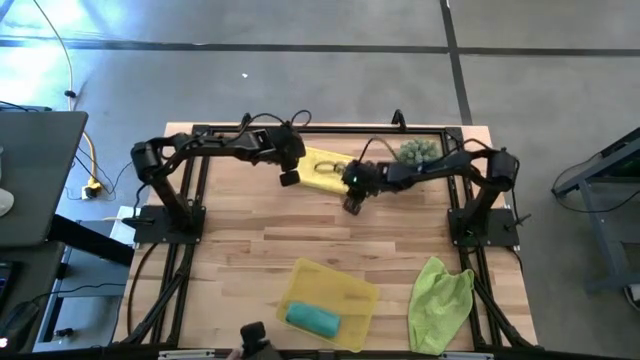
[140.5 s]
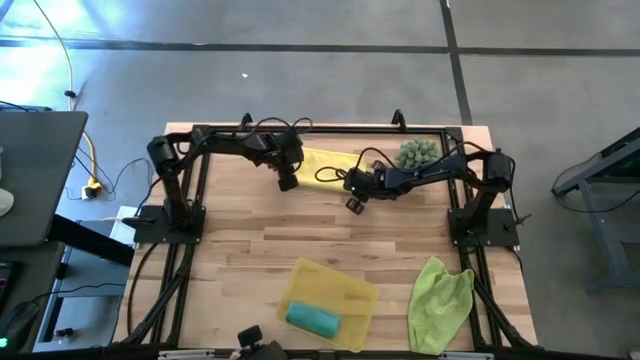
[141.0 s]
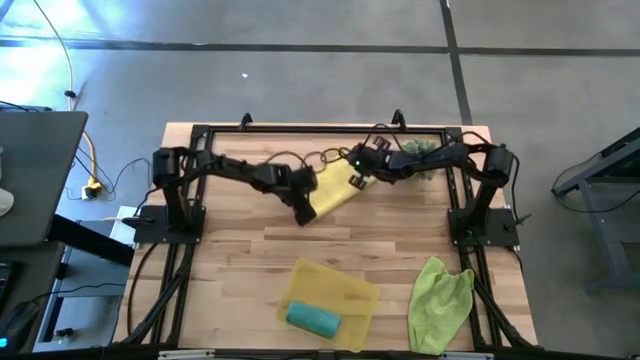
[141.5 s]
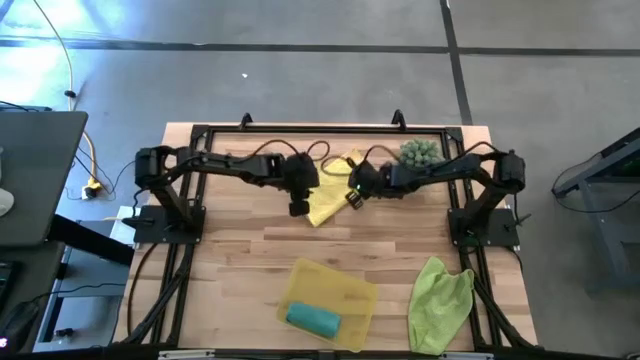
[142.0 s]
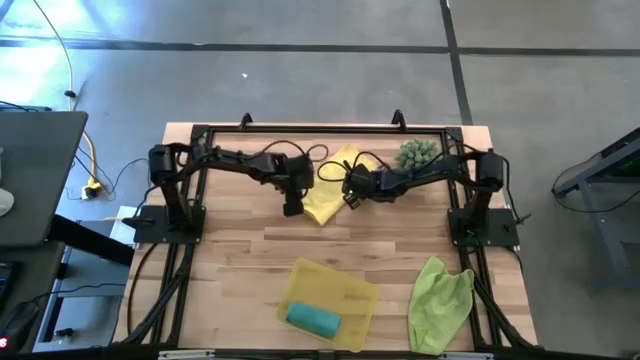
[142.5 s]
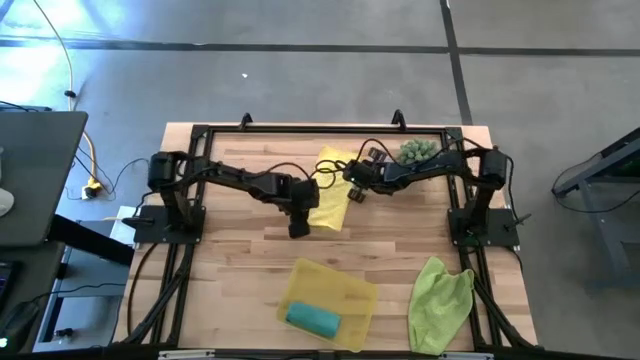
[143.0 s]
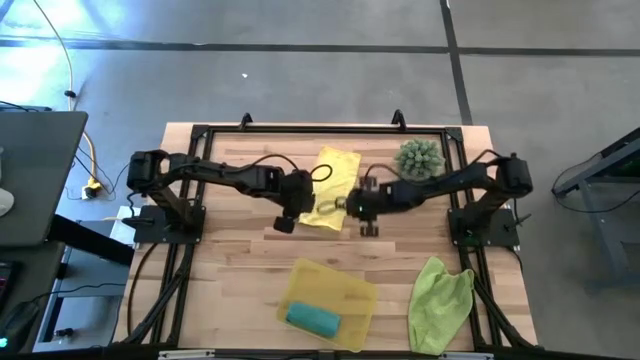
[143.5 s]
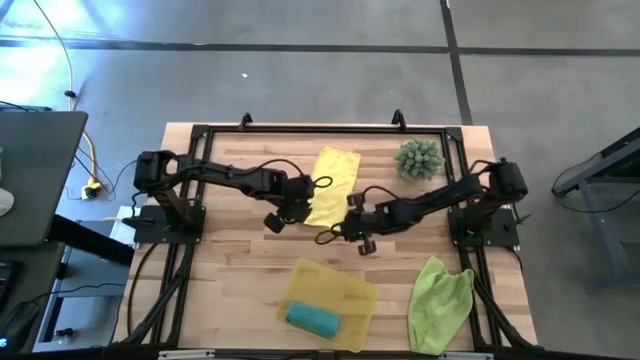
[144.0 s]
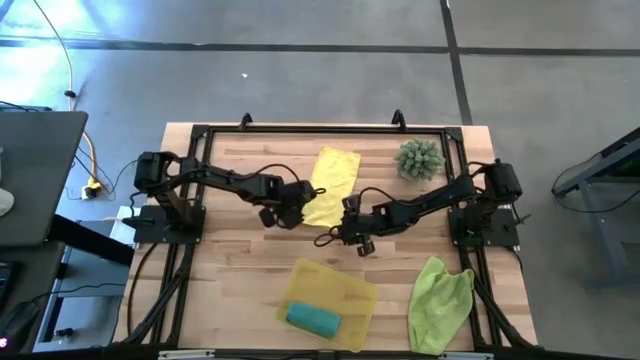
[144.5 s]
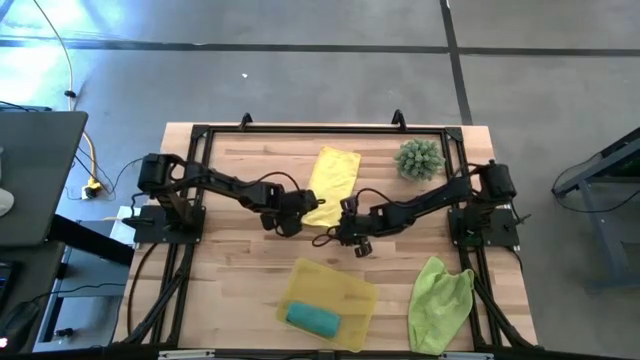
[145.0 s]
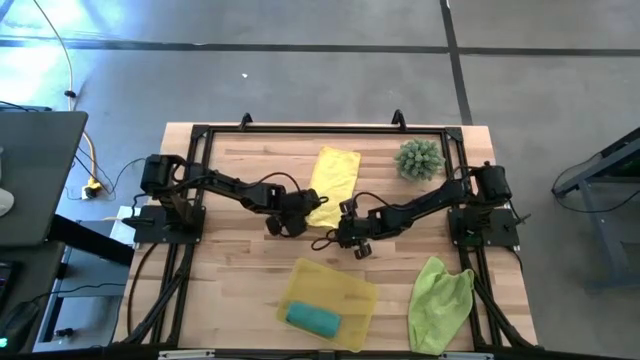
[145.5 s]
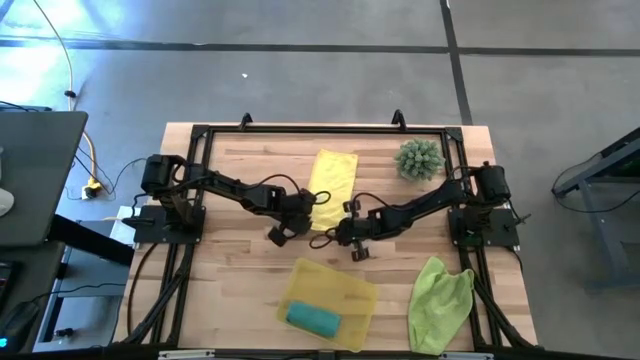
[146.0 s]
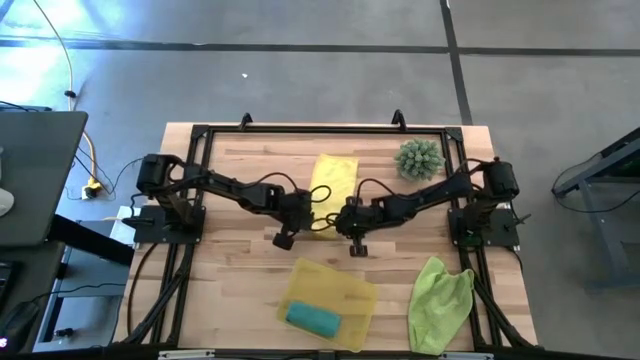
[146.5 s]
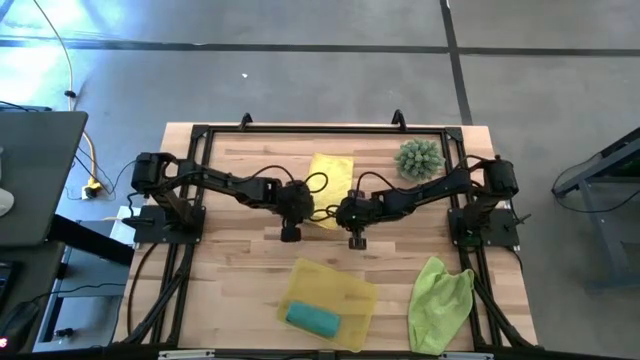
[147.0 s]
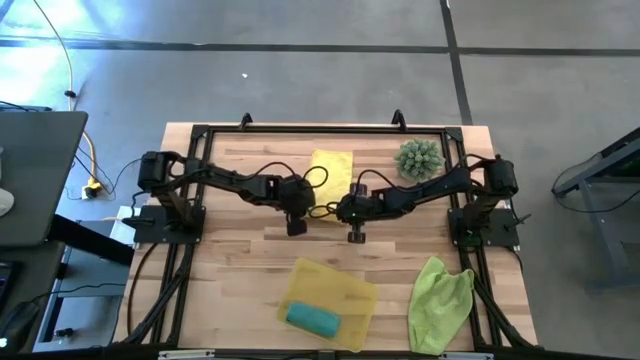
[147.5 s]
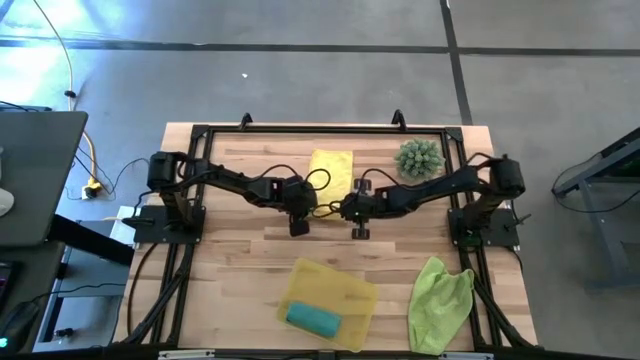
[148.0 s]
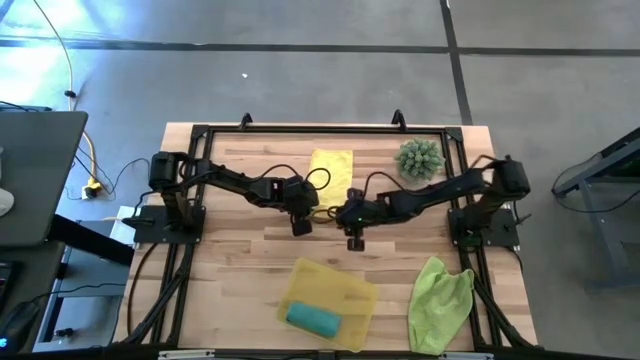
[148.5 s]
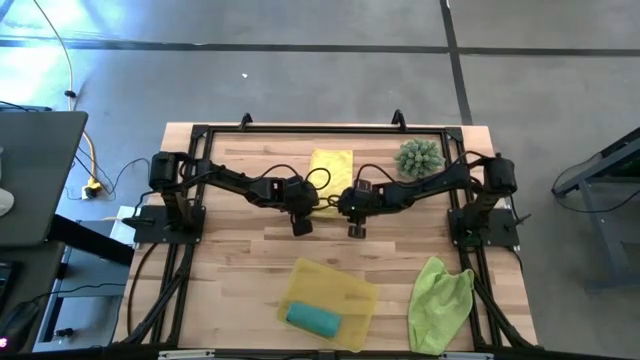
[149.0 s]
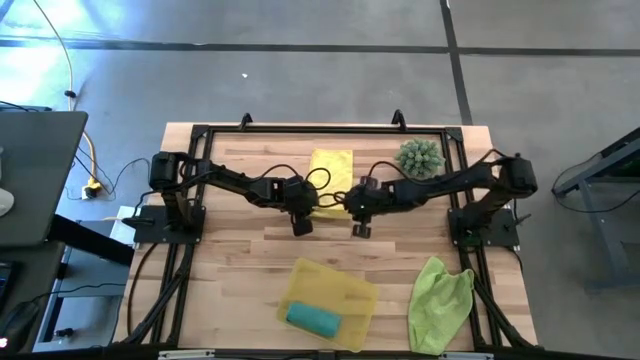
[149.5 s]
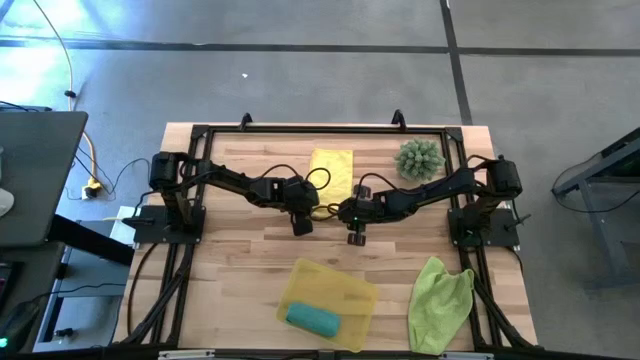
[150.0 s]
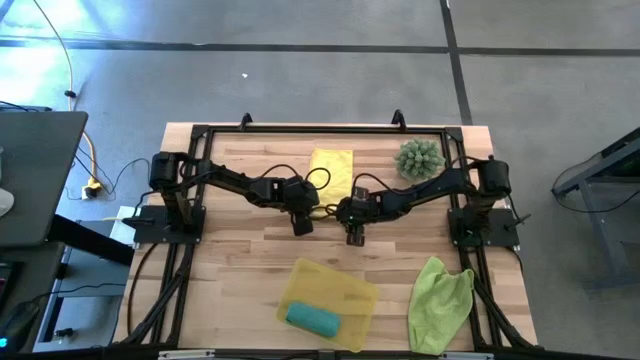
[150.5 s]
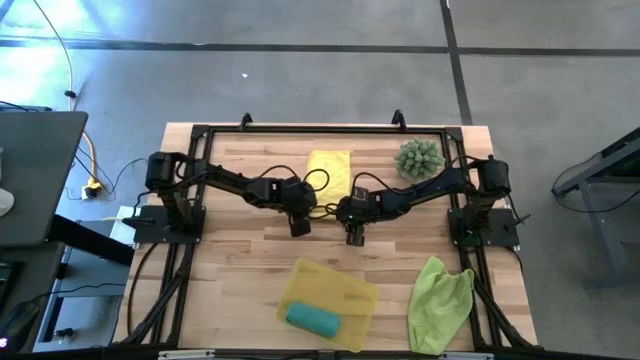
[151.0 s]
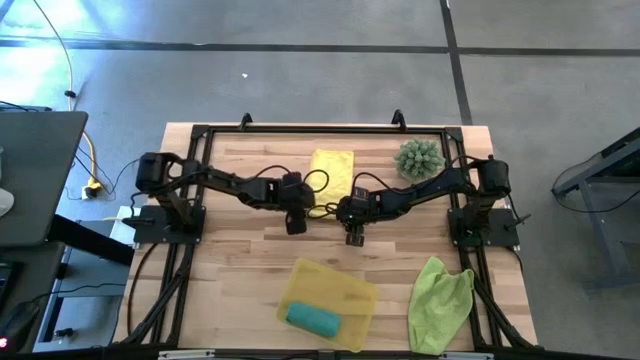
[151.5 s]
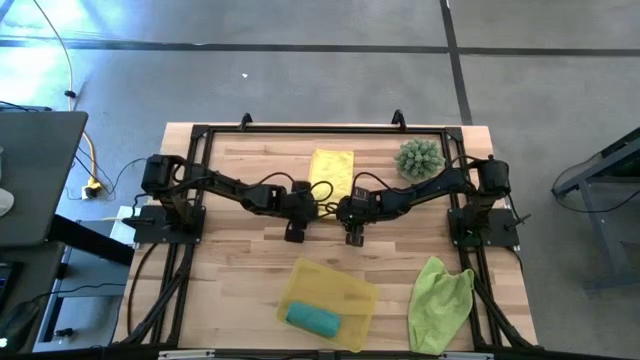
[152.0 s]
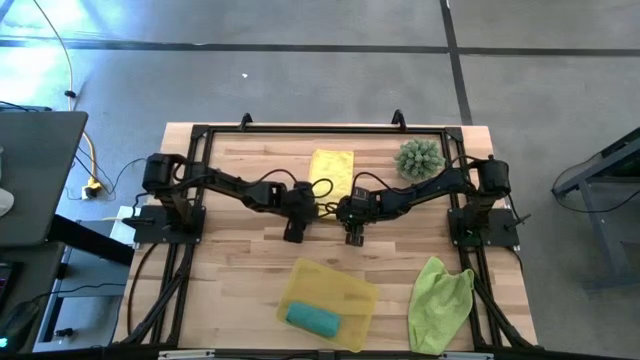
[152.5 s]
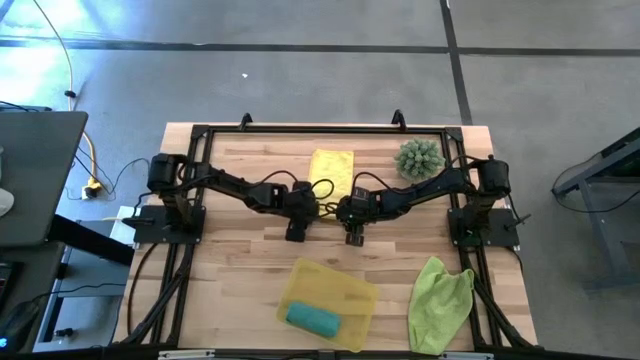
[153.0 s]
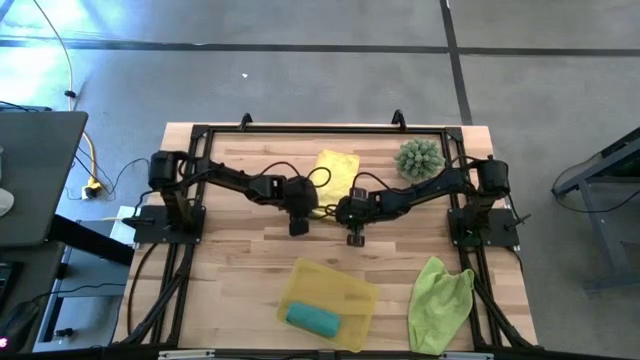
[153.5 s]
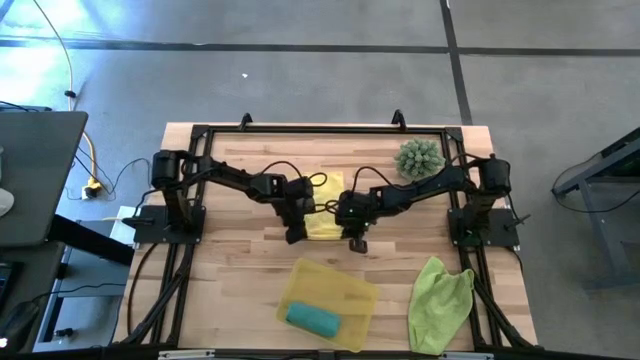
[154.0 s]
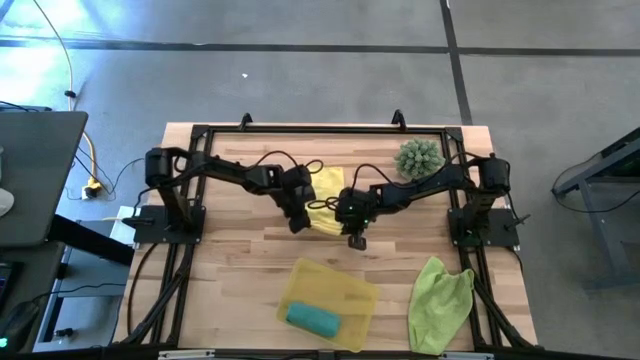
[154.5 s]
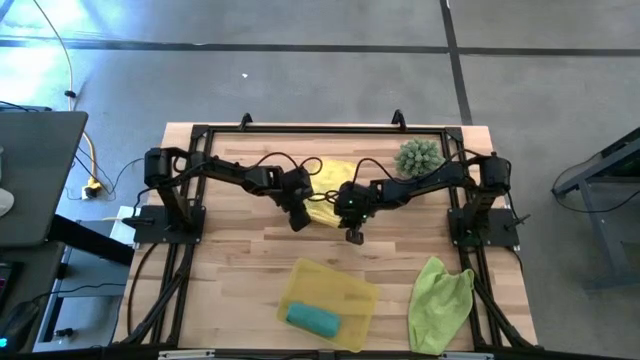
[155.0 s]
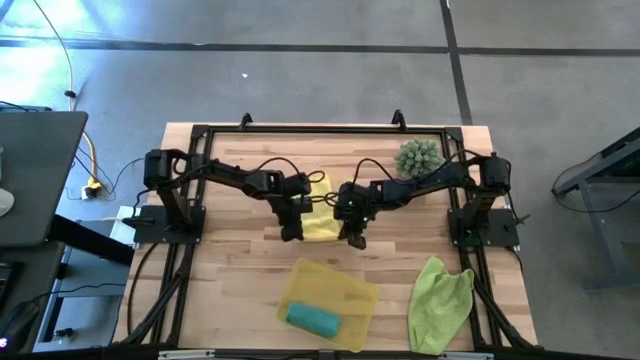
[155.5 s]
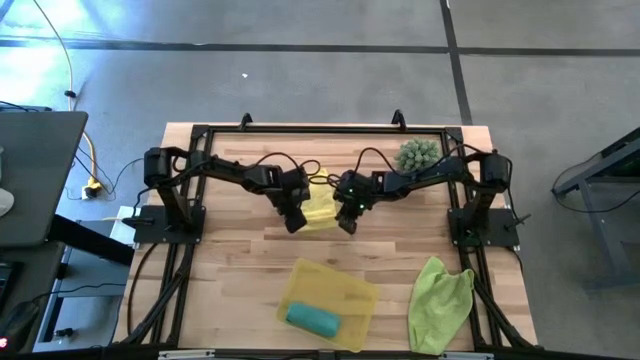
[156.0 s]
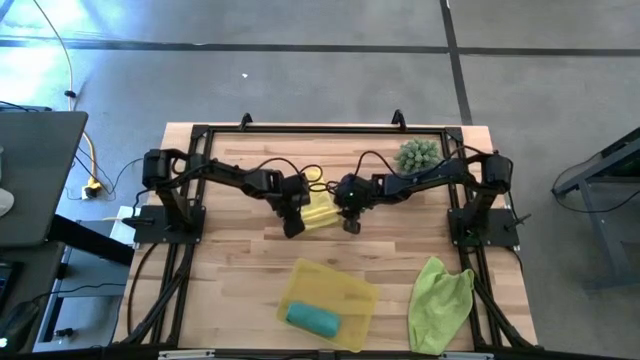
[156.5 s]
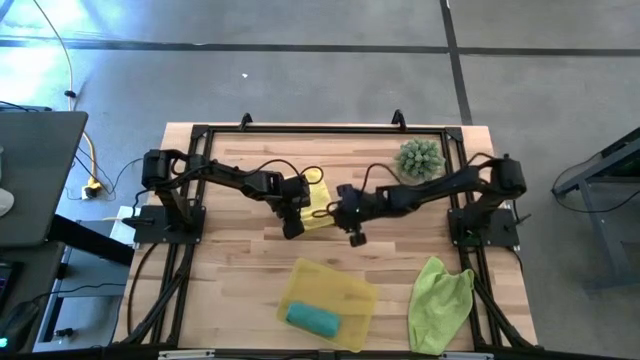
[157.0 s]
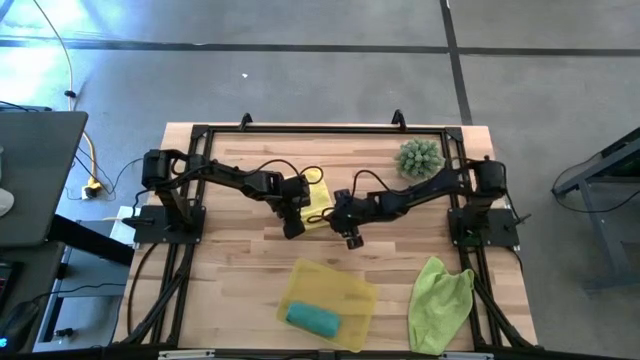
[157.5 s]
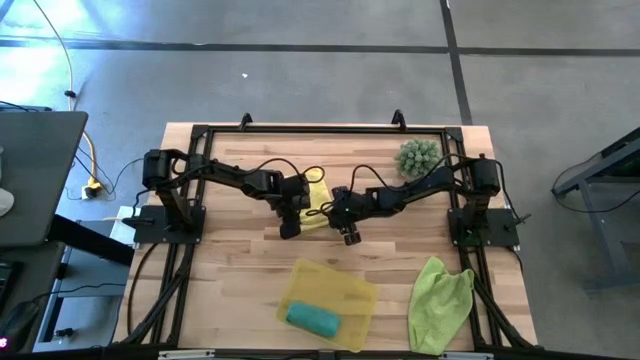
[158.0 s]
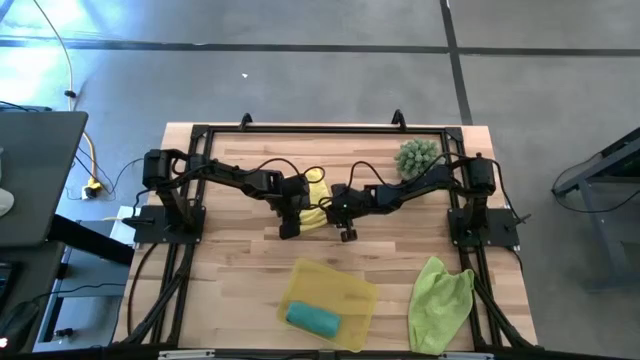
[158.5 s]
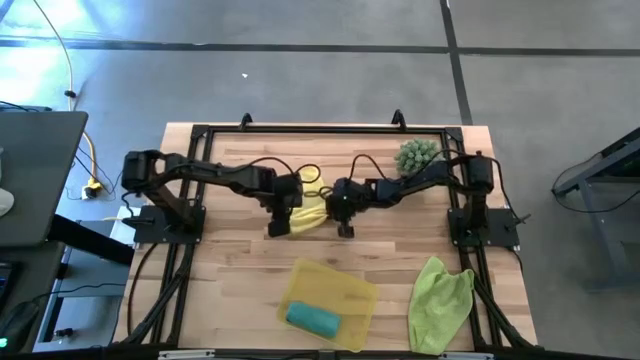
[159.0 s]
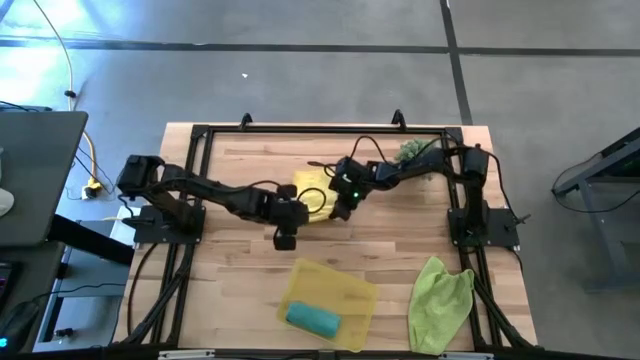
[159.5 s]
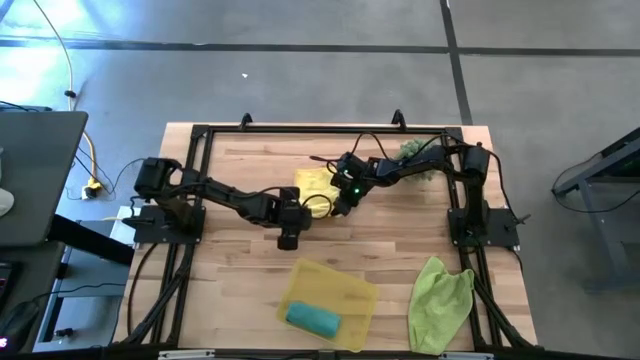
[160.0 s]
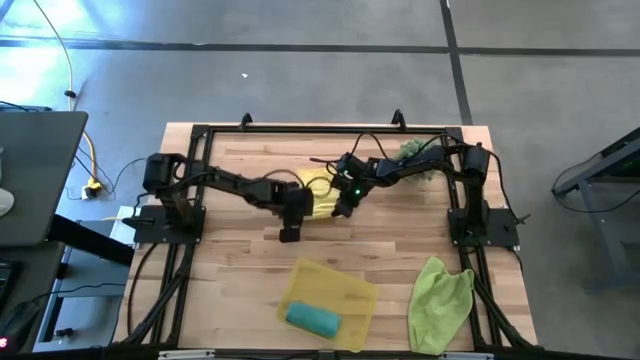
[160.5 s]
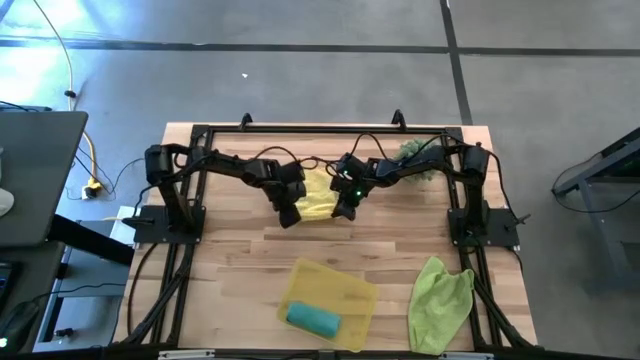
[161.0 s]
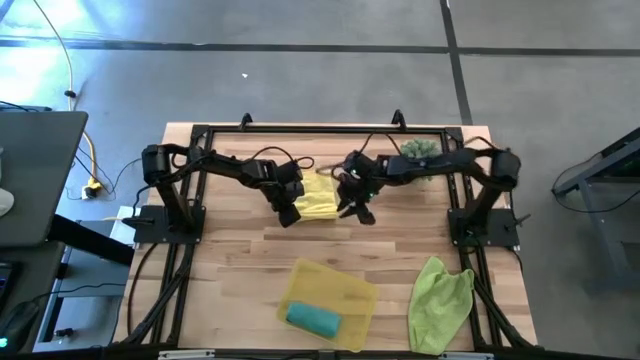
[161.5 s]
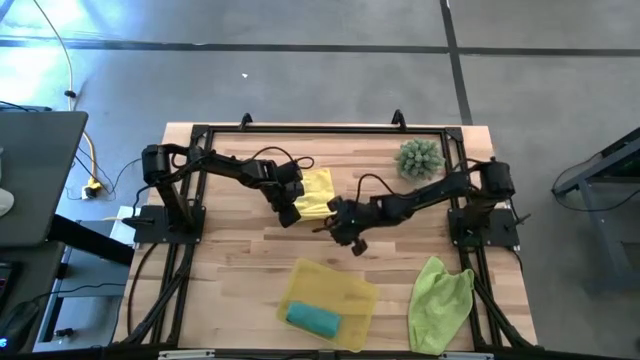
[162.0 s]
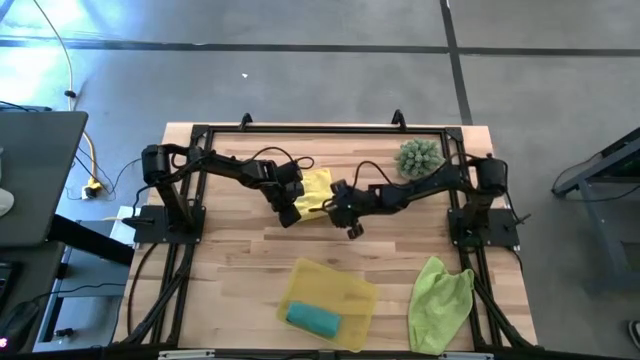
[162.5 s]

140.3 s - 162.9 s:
Task: Roll microfiber towels into tight, uniform cylinder then place into a basket
Roll the yellow towel
